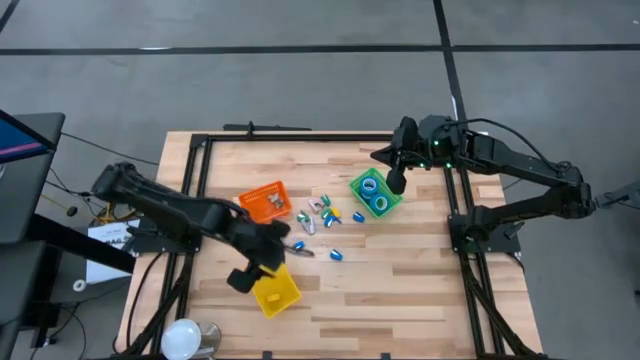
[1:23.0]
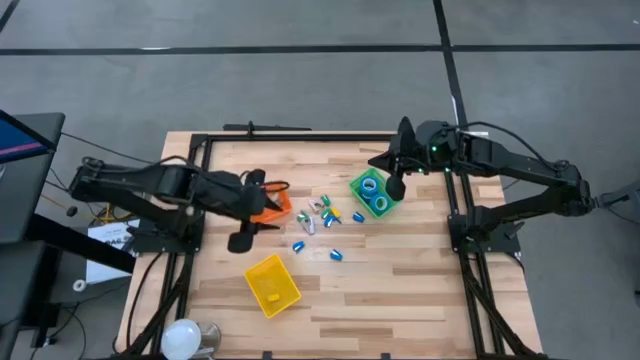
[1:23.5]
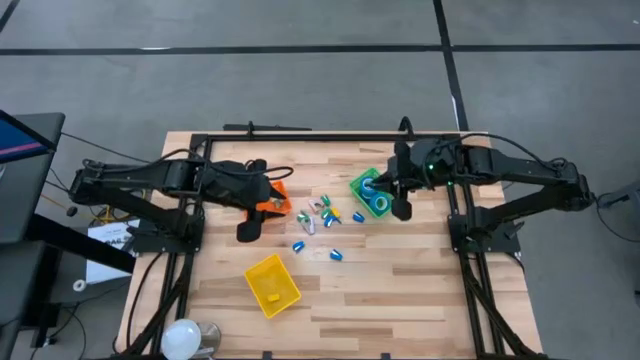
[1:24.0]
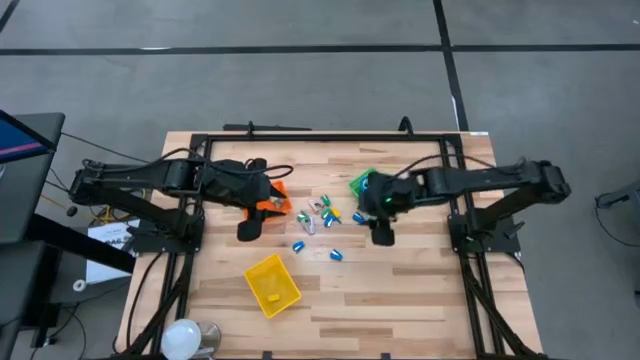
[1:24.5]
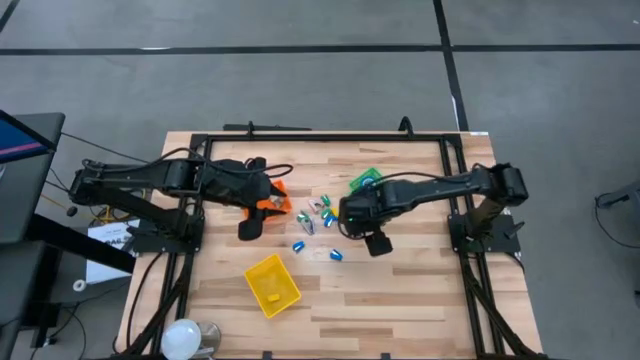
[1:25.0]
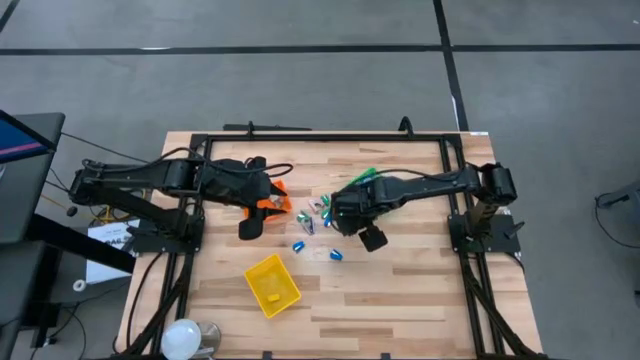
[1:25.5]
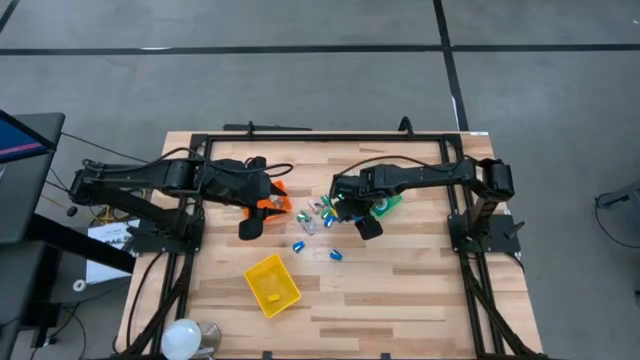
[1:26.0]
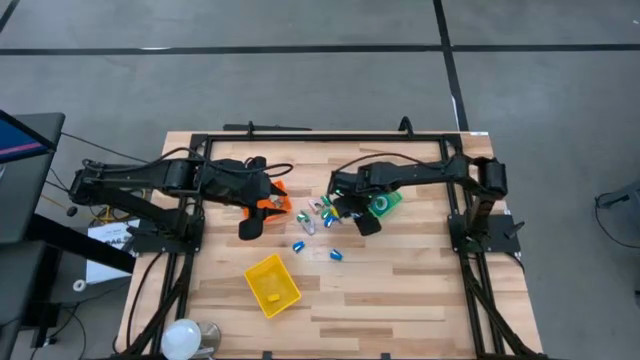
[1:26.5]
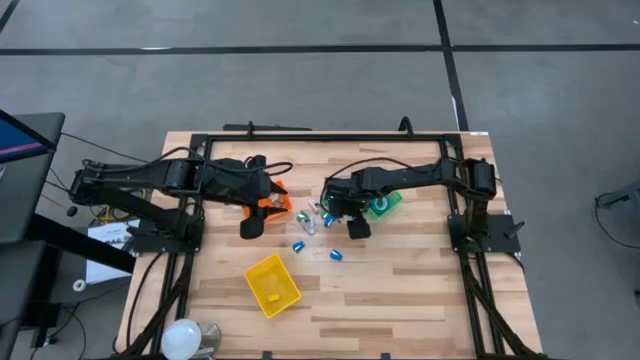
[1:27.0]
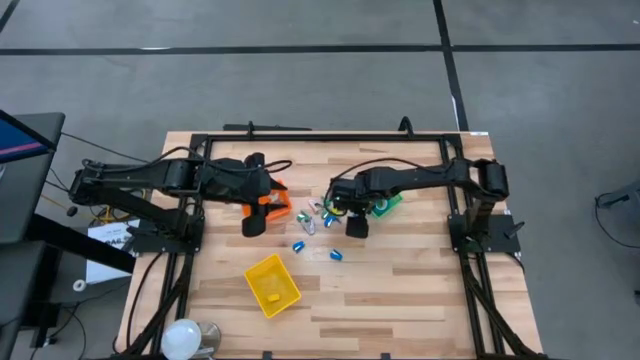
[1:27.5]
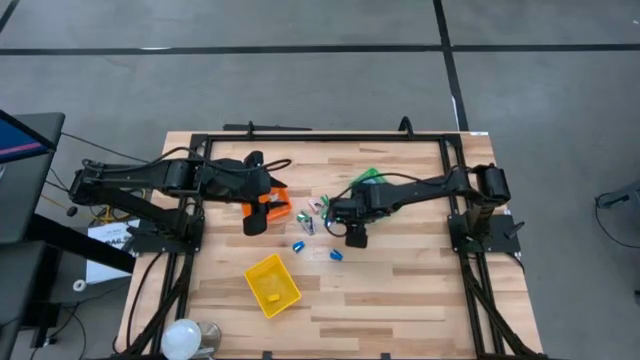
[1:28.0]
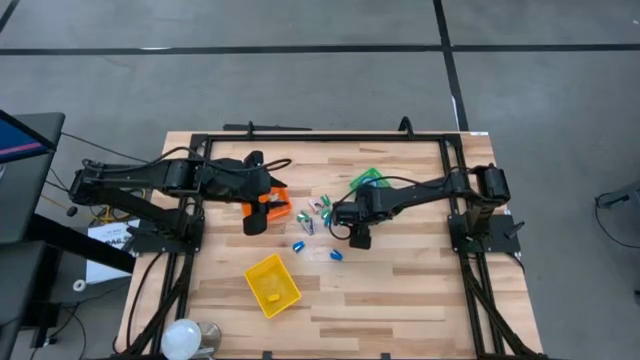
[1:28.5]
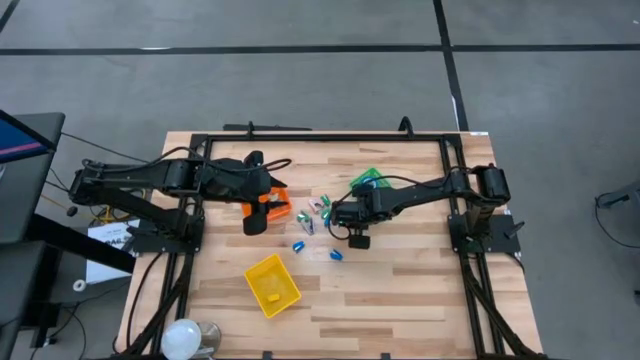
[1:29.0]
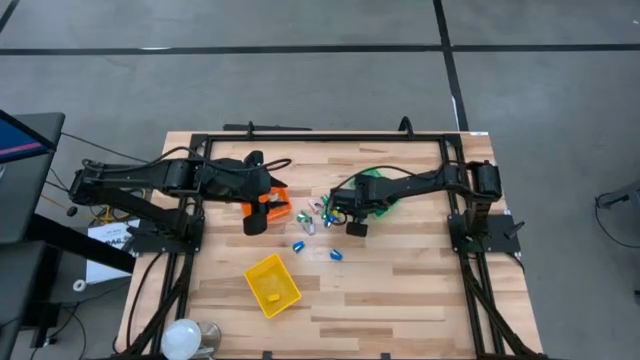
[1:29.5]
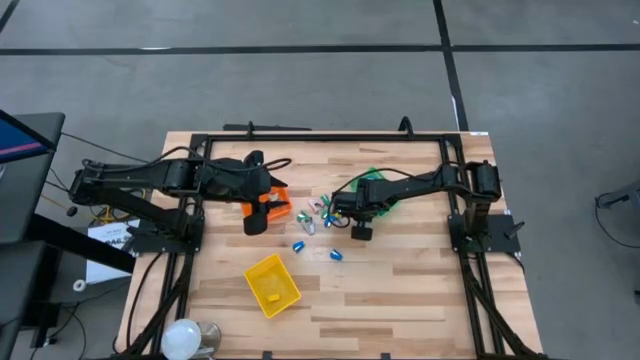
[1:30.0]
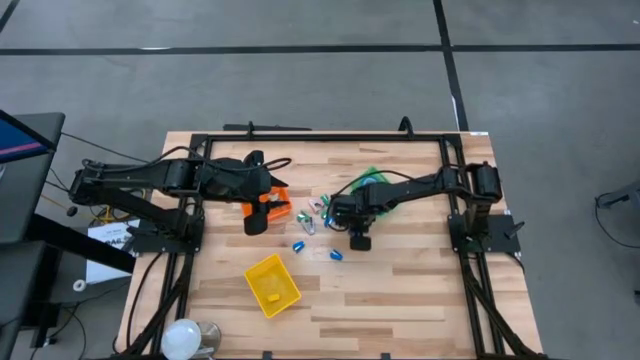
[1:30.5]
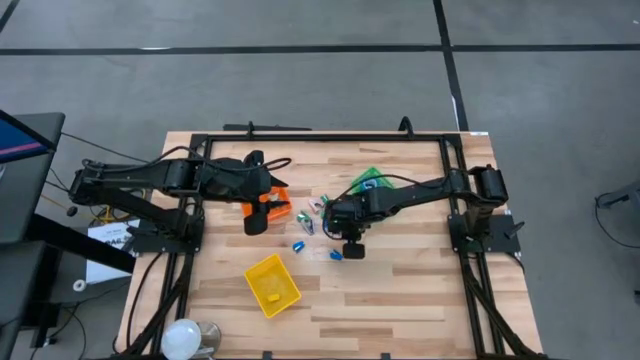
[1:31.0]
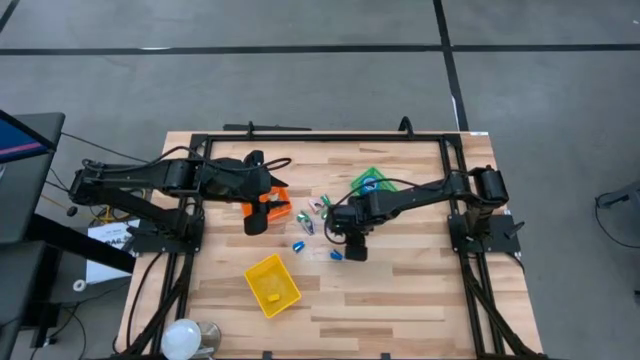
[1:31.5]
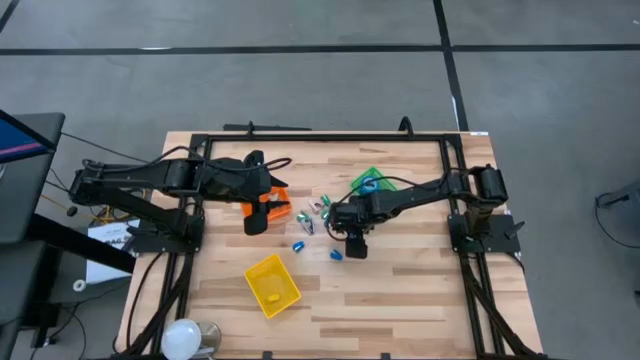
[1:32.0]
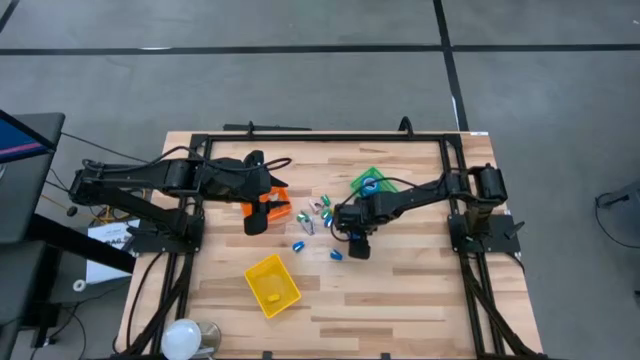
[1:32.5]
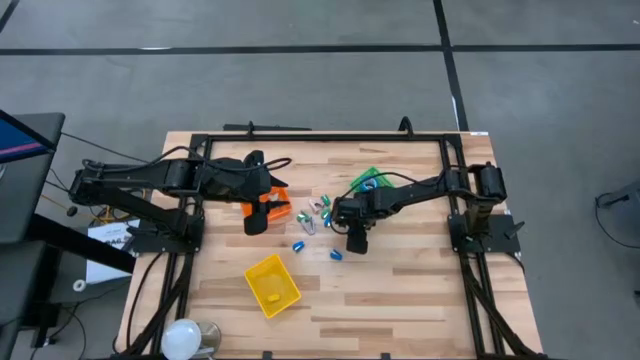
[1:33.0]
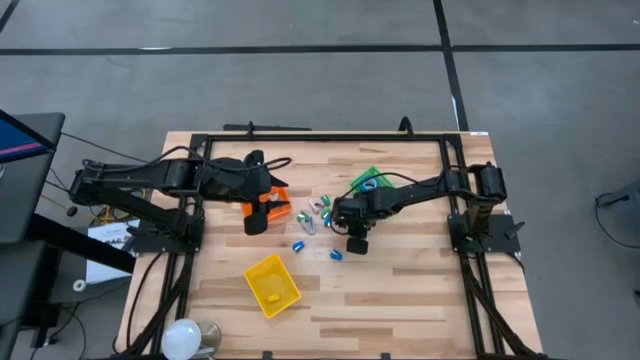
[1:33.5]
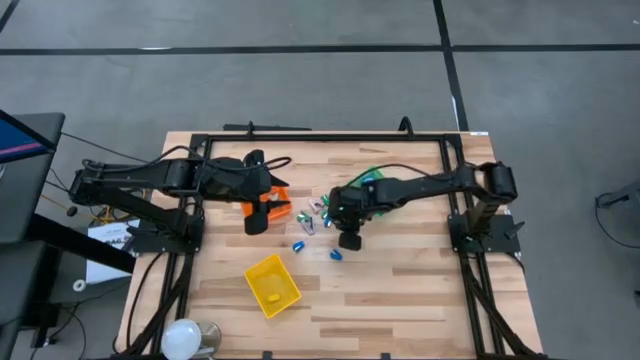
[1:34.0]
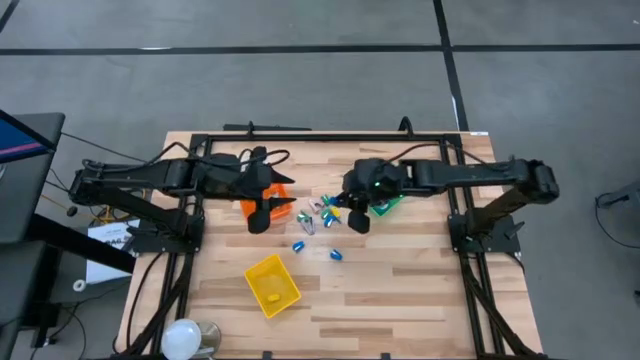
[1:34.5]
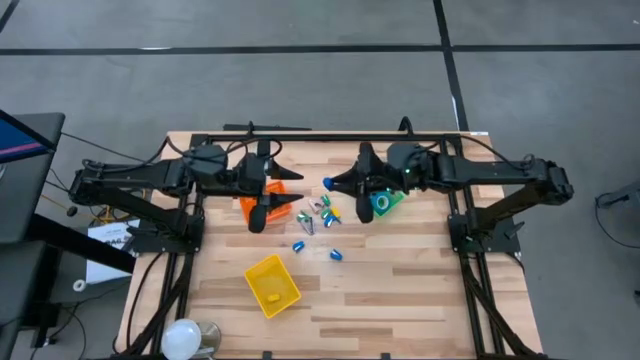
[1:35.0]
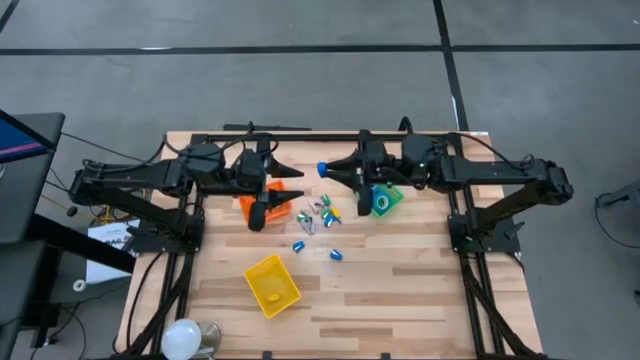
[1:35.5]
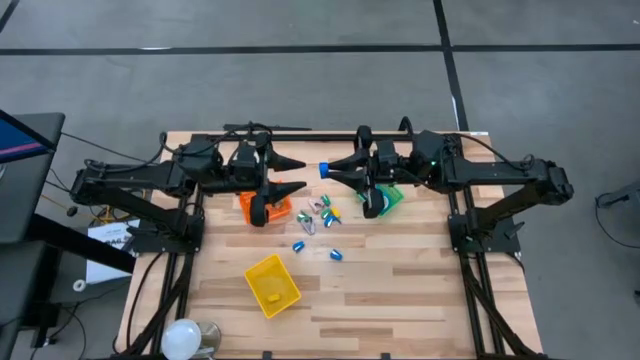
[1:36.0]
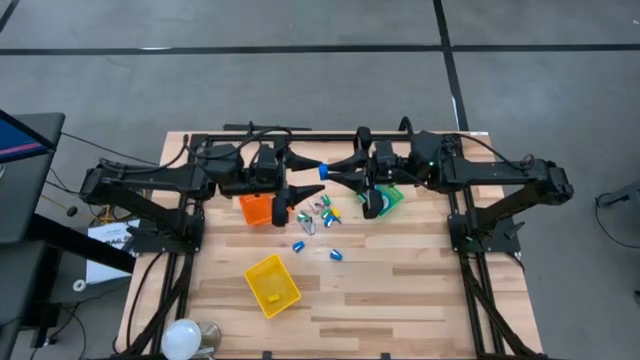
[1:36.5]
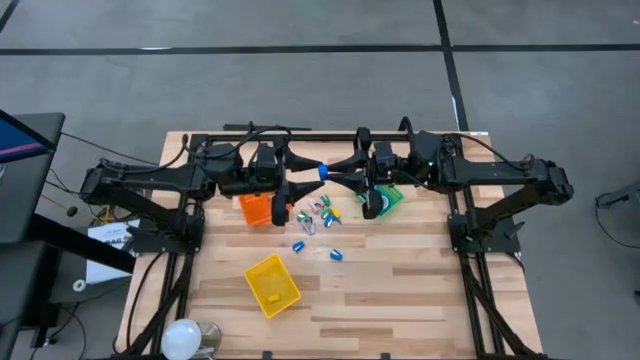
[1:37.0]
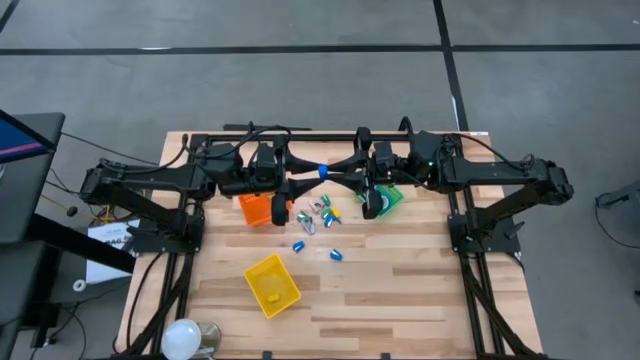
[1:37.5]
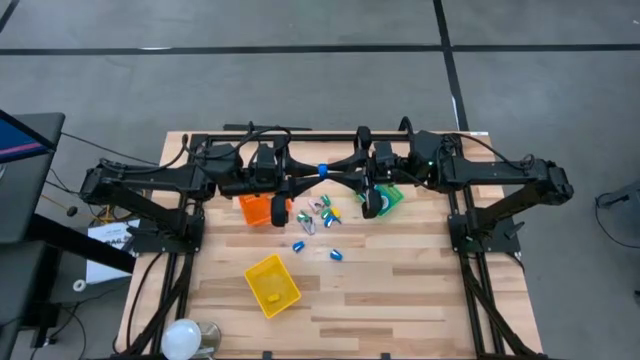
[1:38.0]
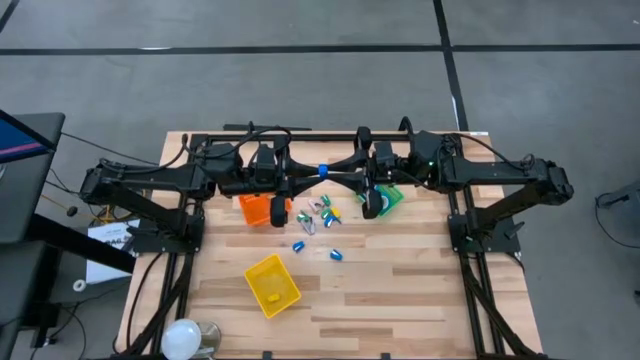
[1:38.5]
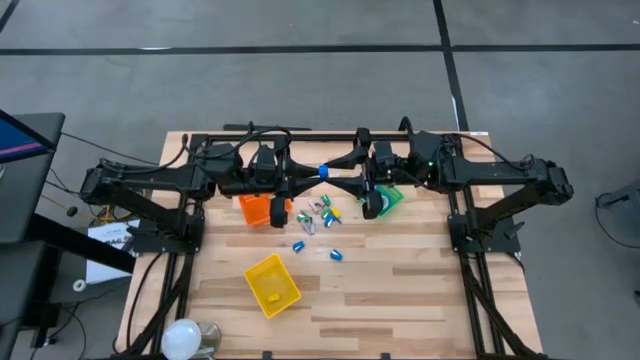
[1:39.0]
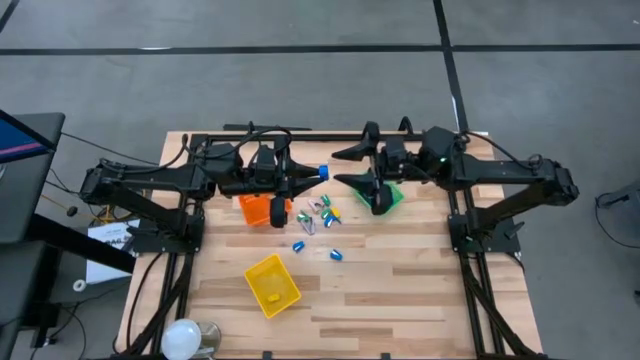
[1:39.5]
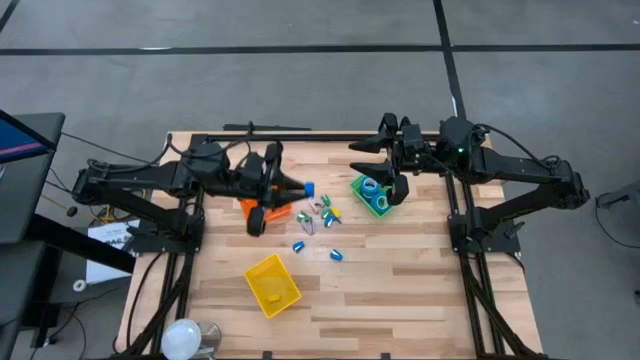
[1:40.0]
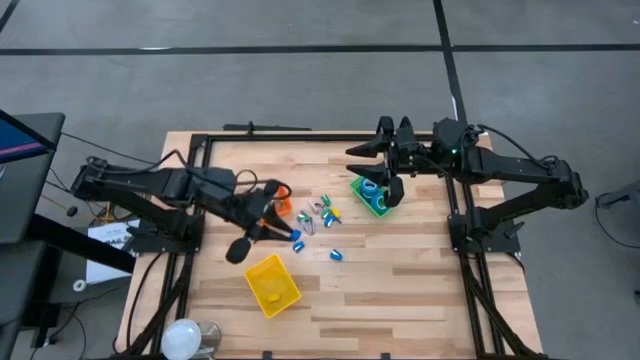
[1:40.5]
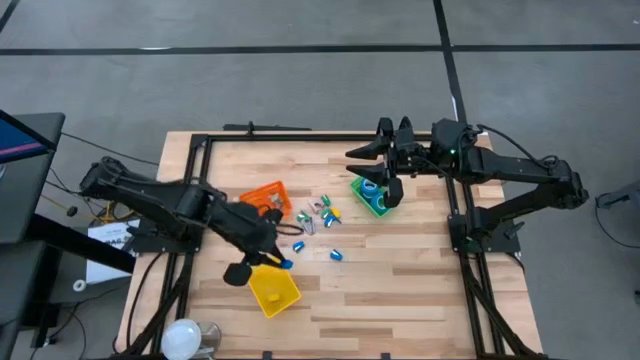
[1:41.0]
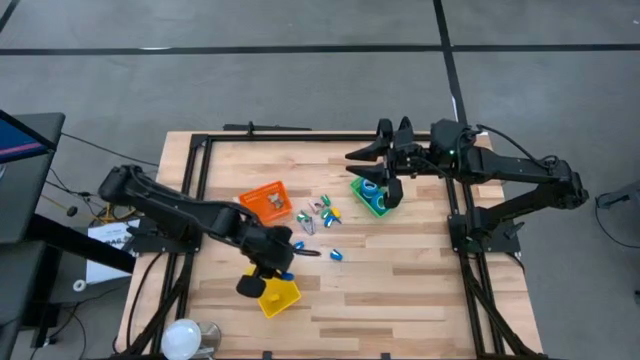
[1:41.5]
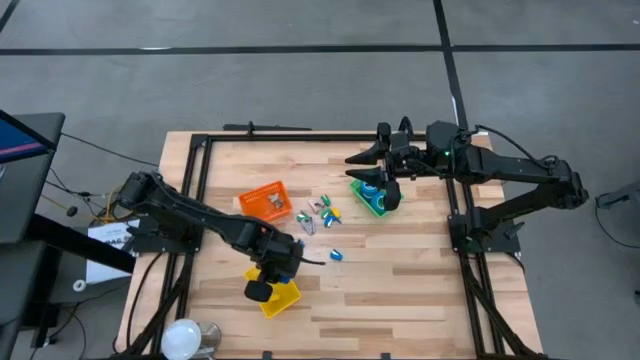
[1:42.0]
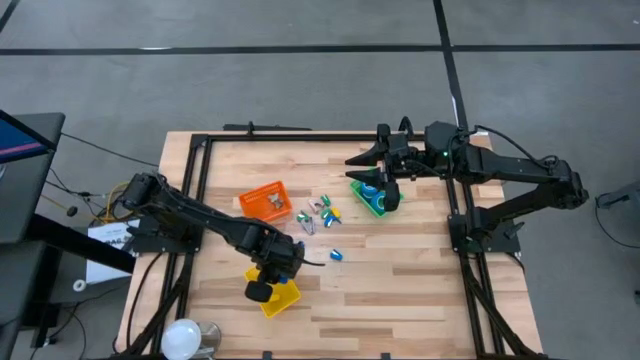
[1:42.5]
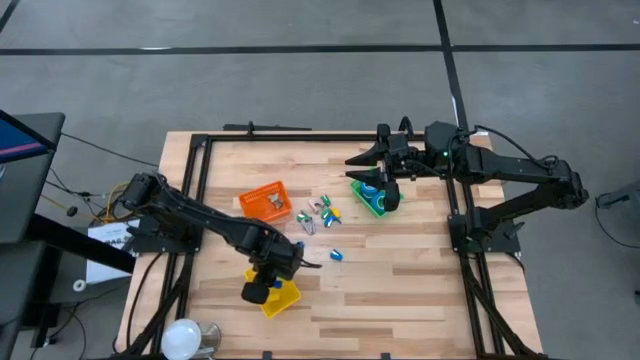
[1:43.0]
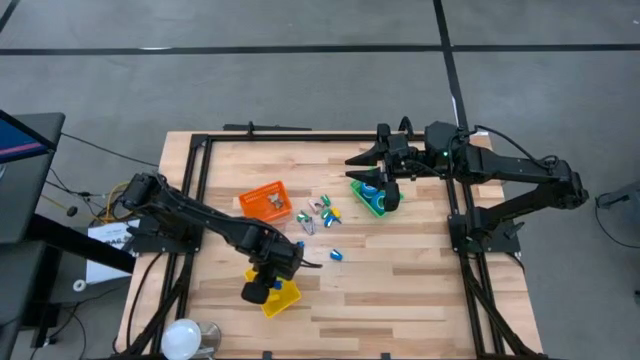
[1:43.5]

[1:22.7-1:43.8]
Task: Pick and place Stapler, Stapler remover, tape
Put the blue stapler into the yellow basket

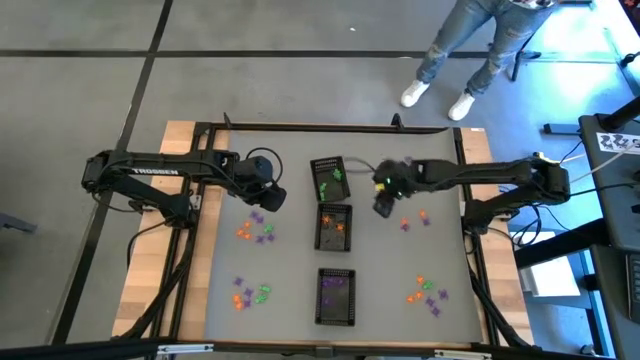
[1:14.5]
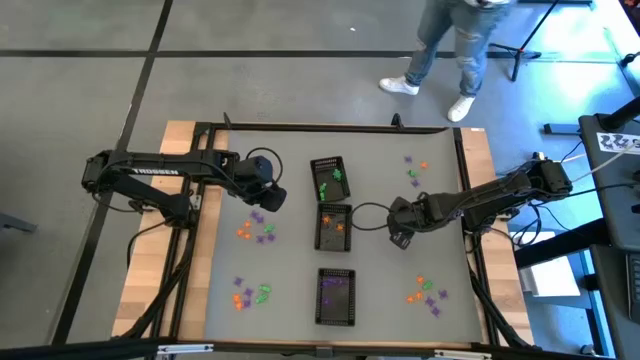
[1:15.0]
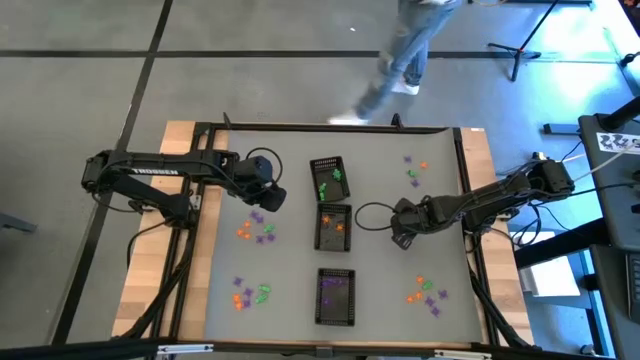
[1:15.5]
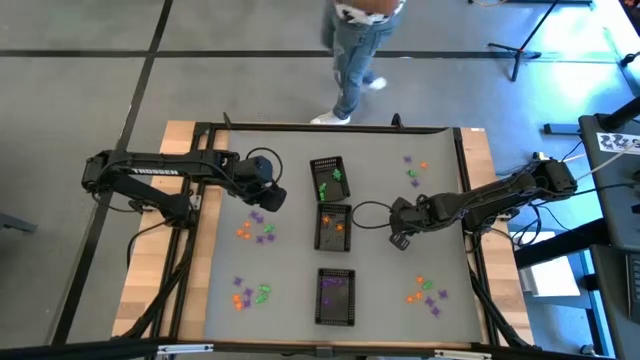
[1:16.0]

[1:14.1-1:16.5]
Task: Sort Halloween decoration
Put the violet spider toy into the bottom black bin
